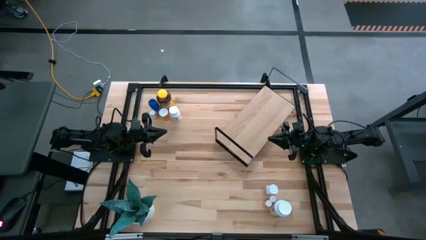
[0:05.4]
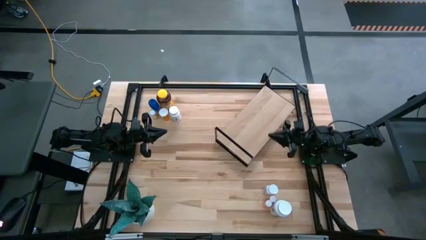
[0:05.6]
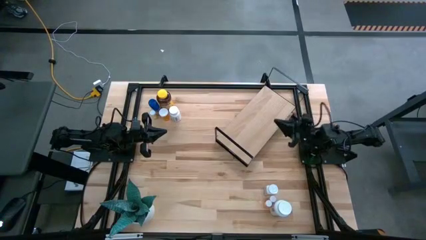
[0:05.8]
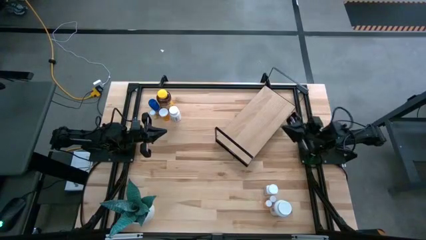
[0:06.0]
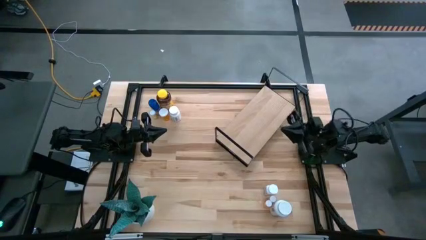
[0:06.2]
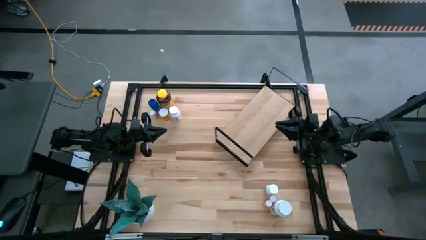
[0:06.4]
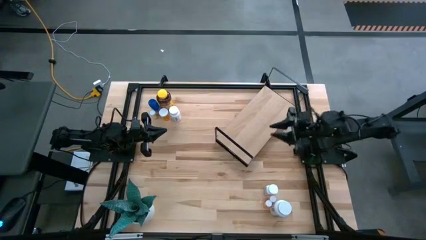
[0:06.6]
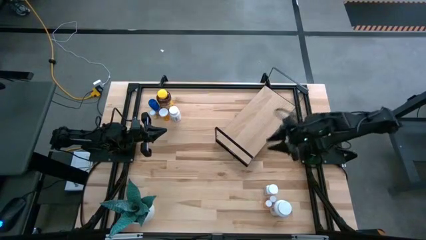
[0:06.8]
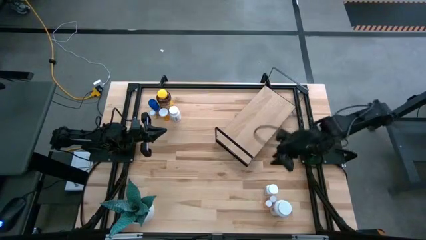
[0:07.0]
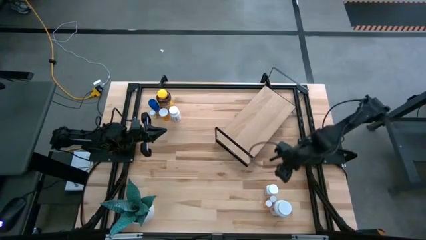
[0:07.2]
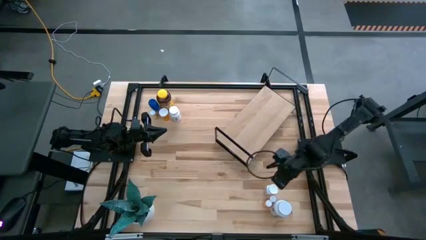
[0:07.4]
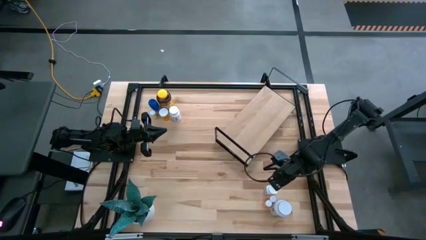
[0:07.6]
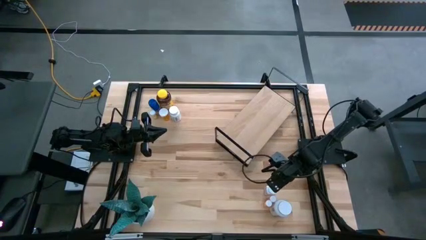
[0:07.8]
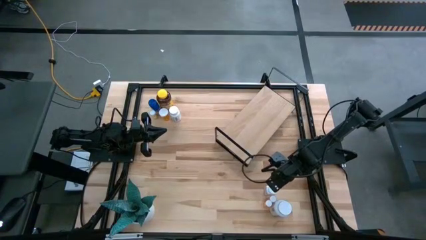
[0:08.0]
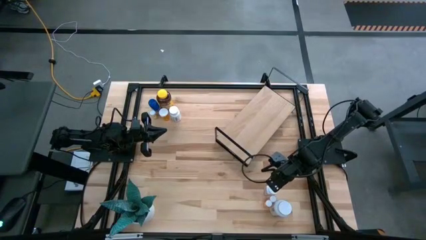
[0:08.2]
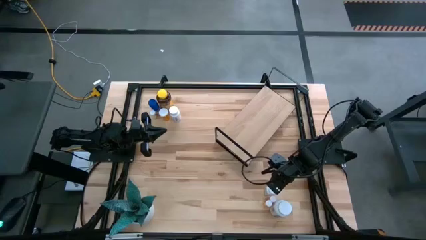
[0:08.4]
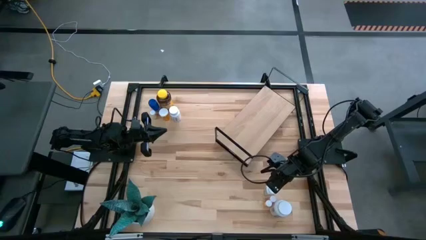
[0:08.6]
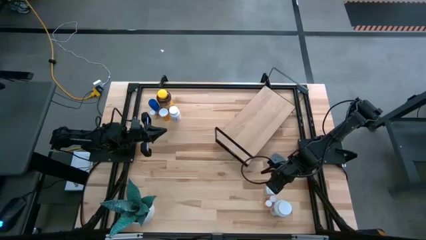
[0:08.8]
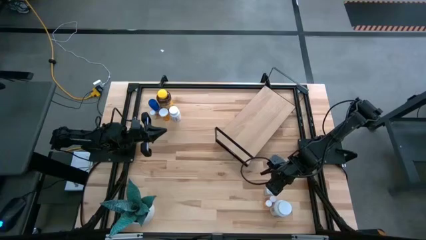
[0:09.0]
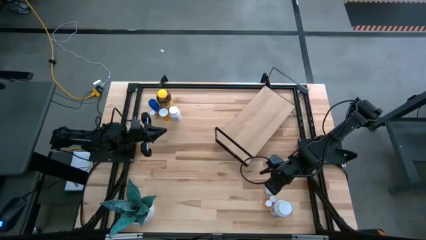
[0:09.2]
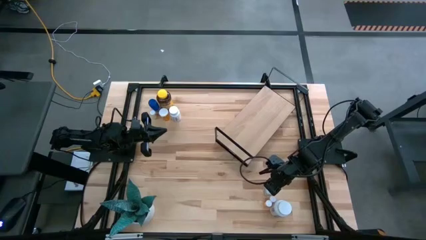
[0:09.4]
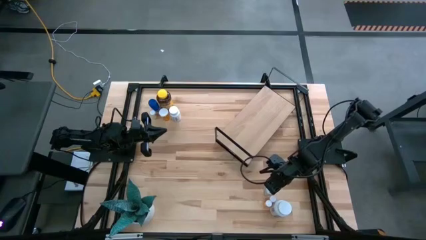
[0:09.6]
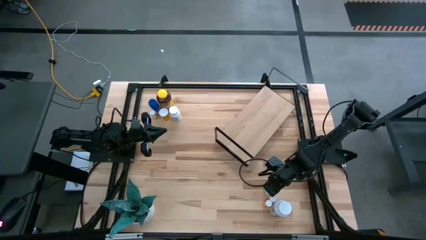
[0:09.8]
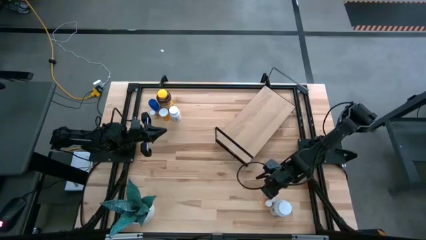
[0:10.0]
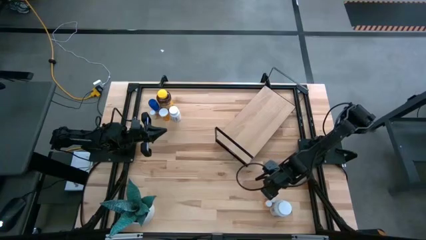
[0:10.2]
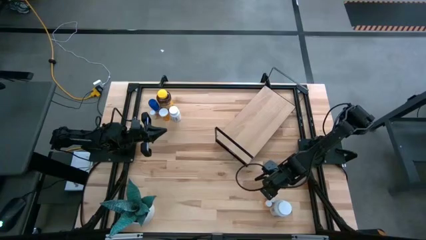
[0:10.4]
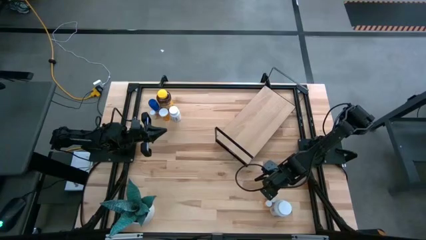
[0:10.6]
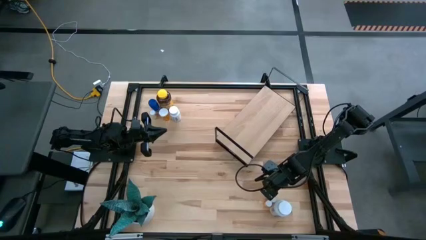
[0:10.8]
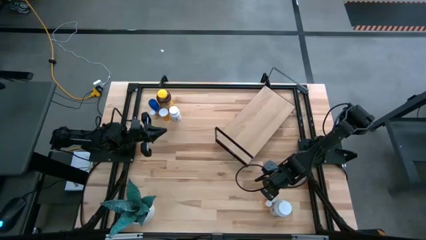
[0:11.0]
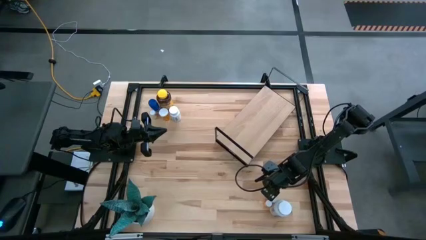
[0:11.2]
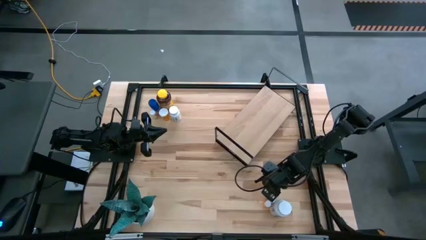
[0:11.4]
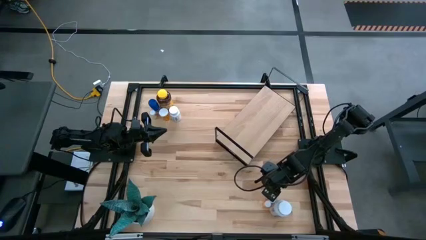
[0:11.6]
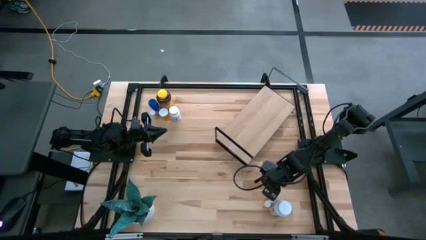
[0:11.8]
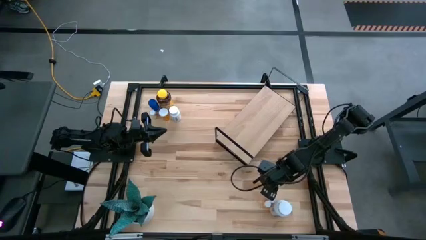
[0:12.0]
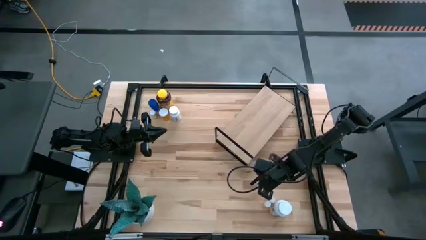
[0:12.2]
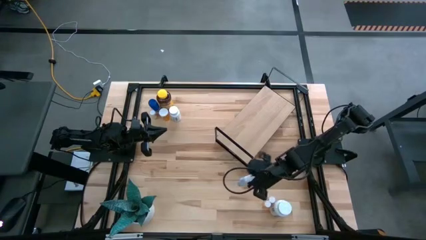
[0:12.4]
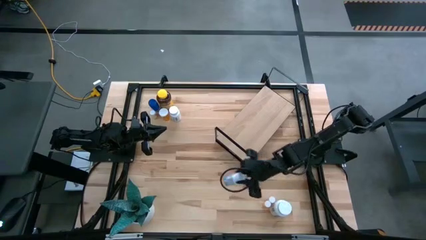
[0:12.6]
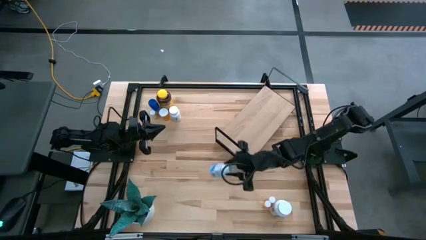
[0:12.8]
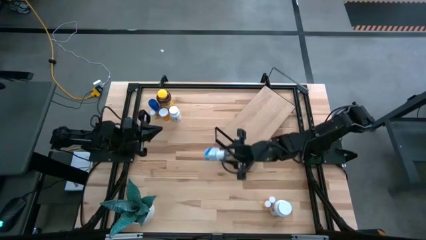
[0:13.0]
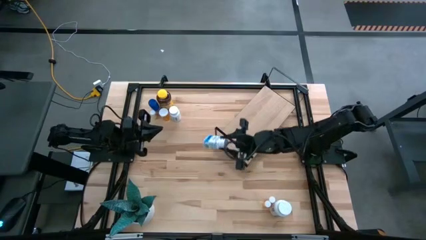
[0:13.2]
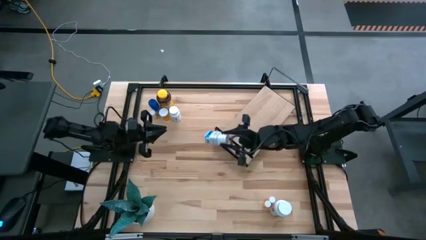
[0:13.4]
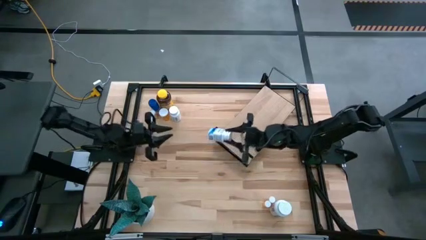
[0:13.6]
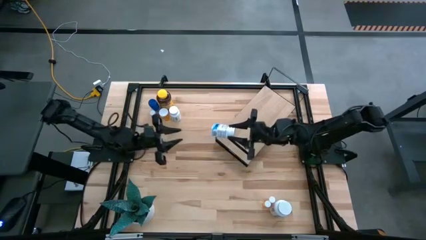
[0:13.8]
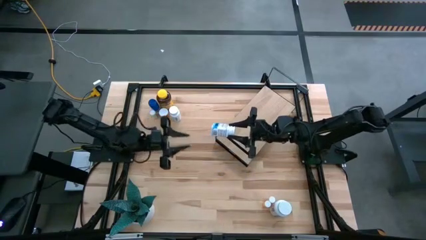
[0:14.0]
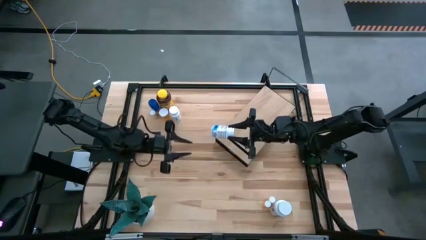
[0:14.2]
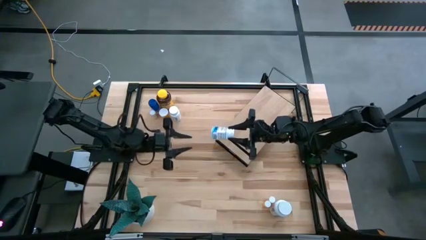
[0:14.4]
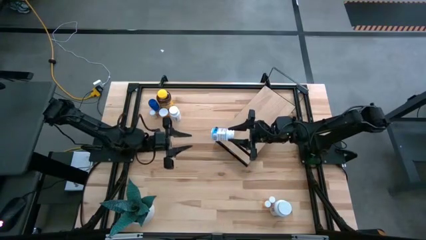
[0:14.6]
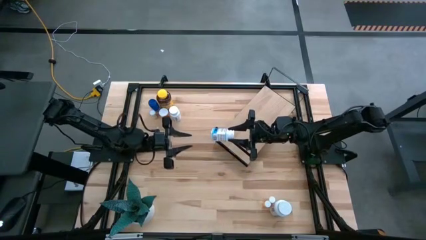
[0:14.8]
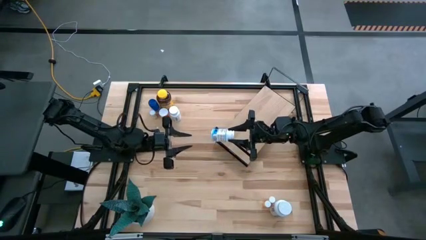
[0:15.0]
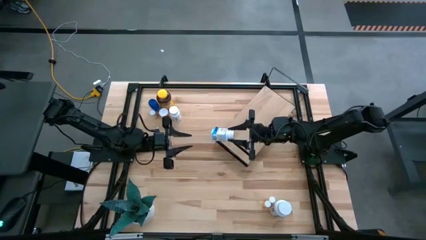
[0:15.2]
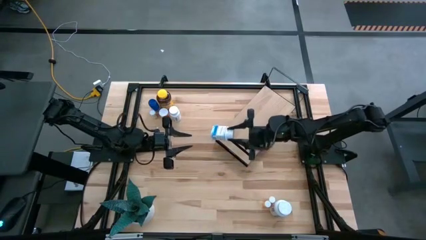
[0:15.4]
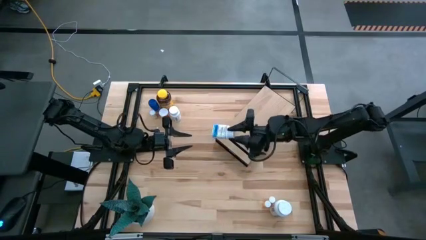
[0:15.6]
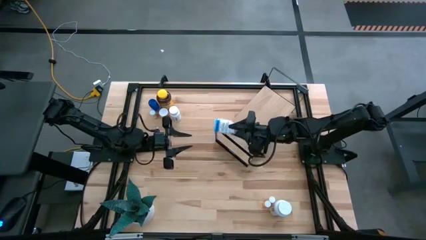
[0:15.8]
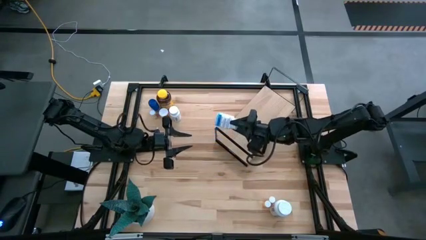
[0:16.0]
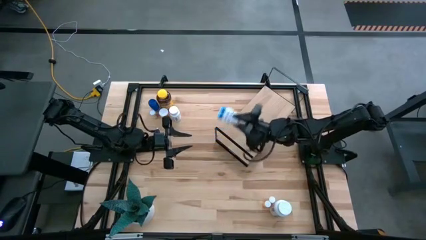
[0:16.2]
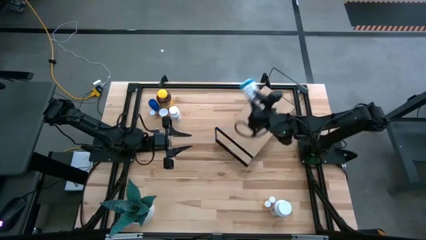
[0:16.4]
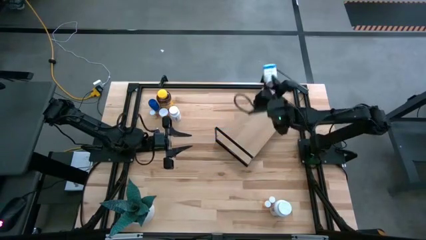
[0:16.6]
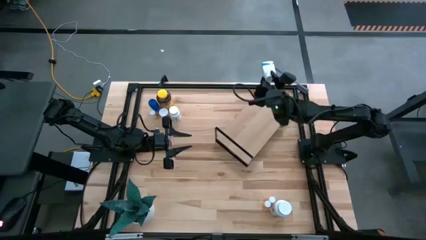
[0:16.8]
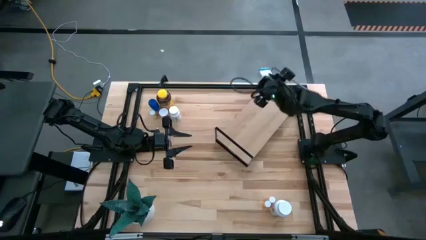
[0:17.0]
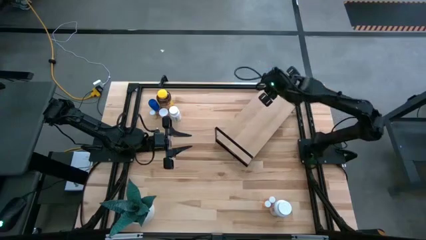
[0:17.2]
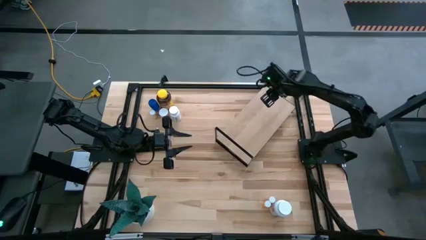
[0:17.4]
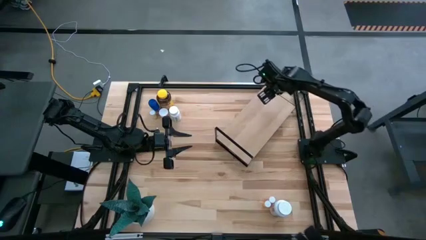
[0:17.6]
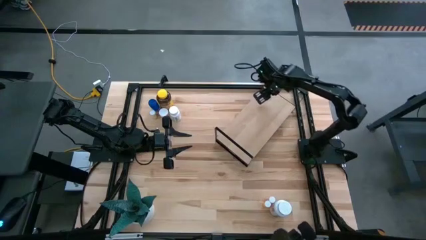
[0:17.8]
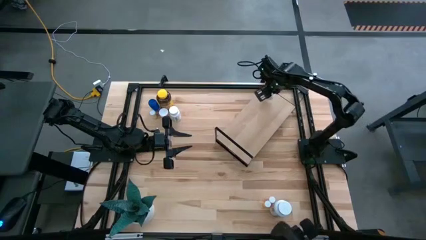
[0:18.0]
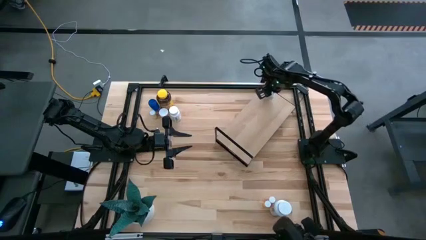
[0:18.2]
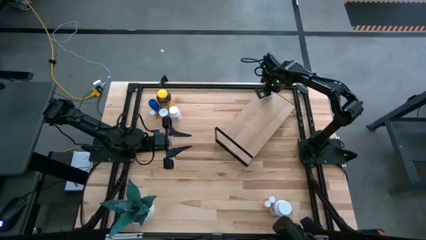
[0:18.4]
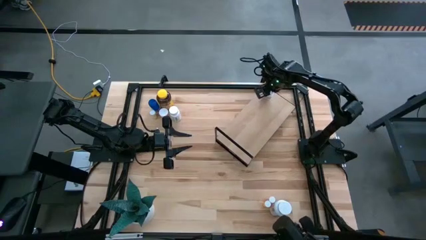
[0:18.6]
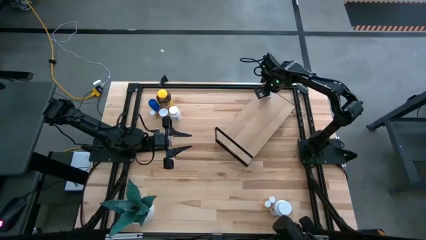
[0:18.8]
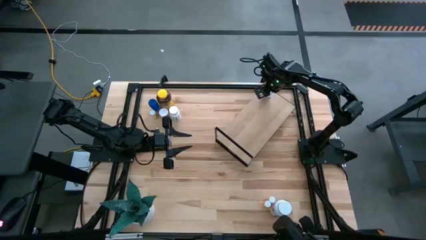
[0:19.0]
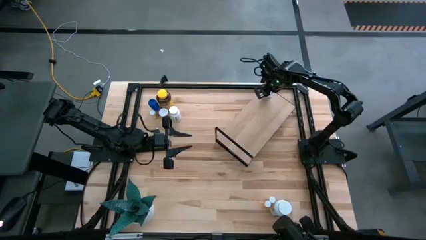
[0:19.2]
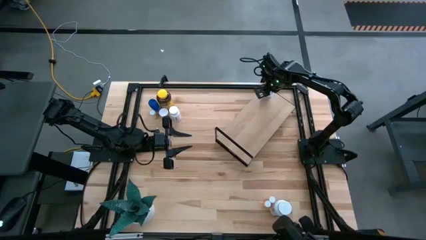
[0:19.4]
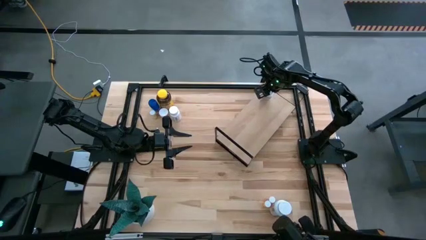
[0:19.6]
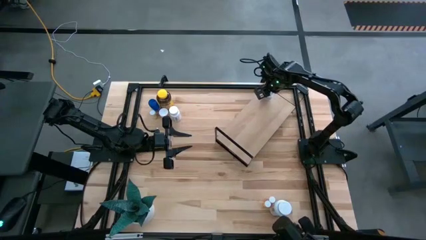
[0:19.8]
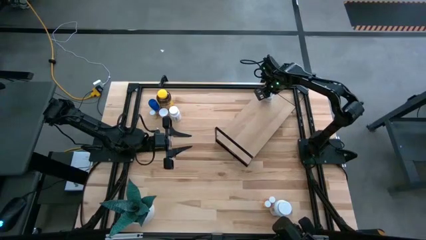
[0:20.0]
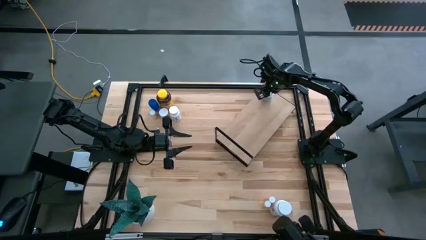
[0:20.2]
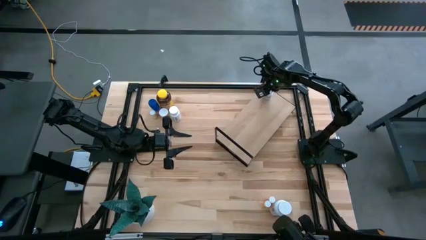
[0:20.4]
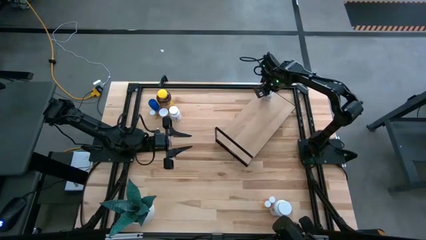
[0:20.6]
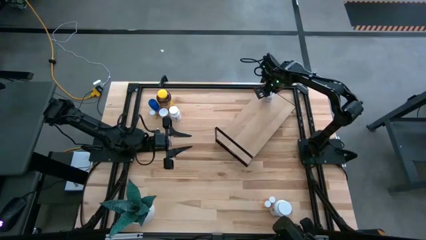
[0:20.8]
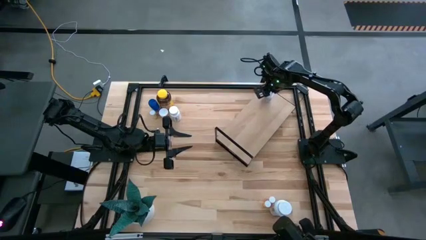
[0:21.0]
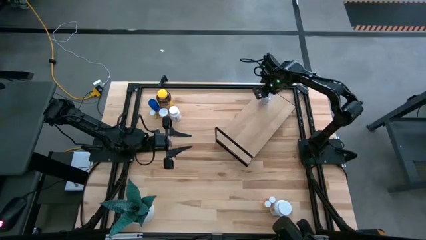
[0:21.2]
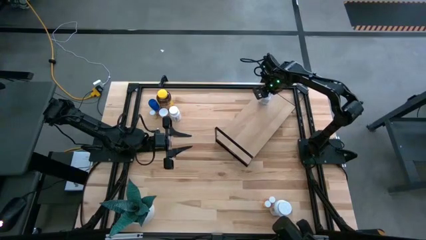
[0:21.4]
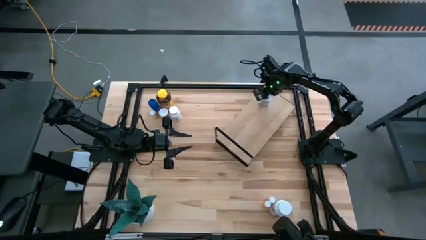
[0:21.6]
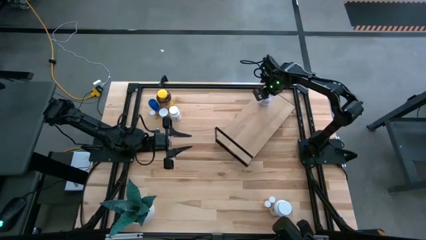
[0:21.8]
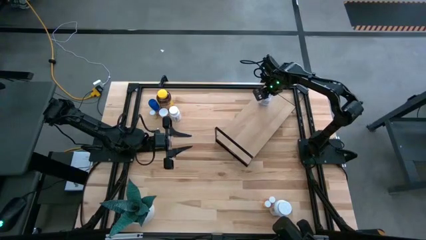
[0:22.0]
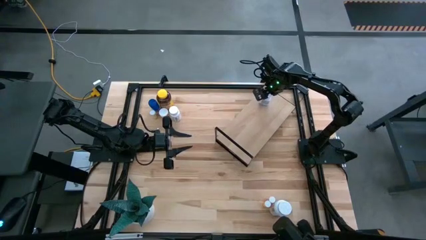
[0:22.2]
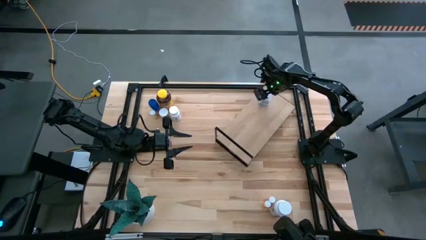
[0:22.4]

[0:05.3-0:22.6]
Task: Pick and place medicine bottles onto shelf by color
Put the bottom white medicine bottle on the shelf
